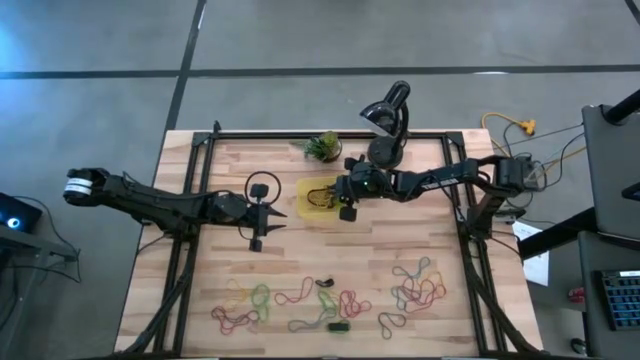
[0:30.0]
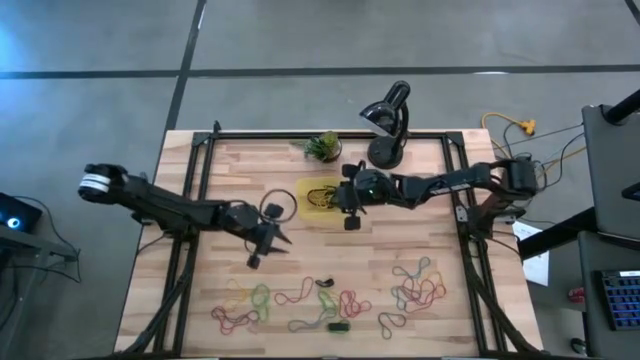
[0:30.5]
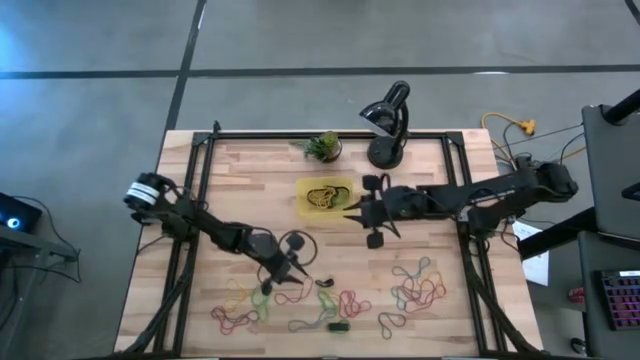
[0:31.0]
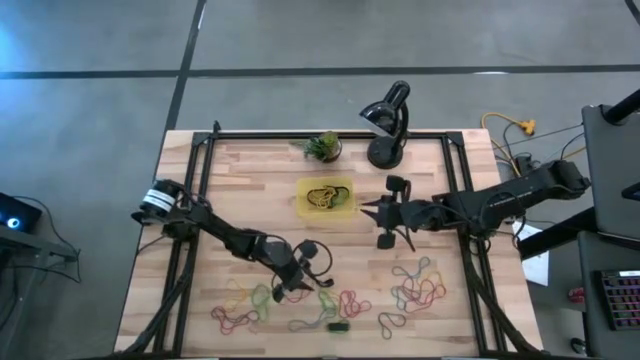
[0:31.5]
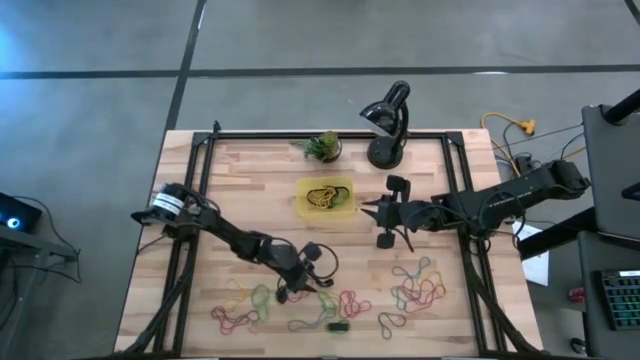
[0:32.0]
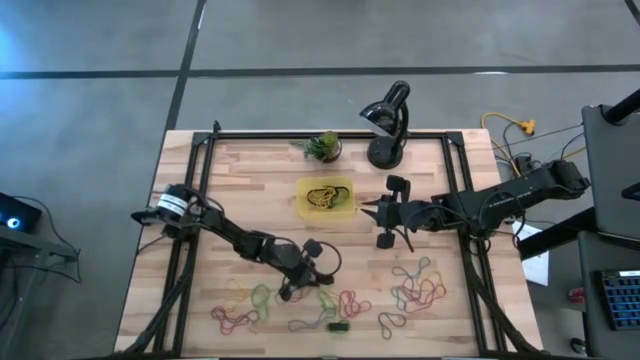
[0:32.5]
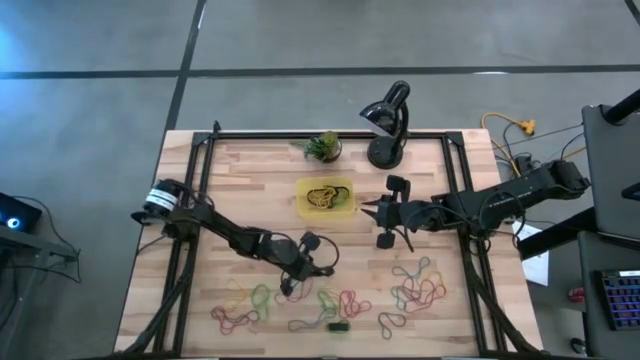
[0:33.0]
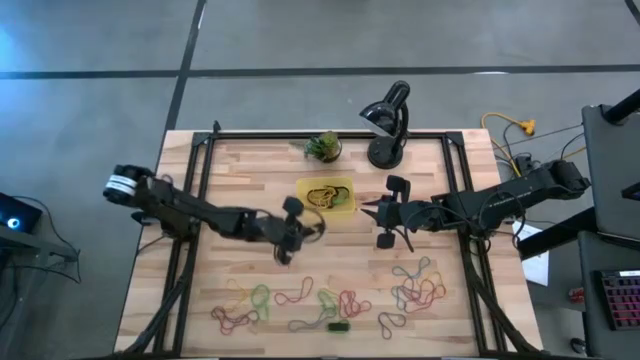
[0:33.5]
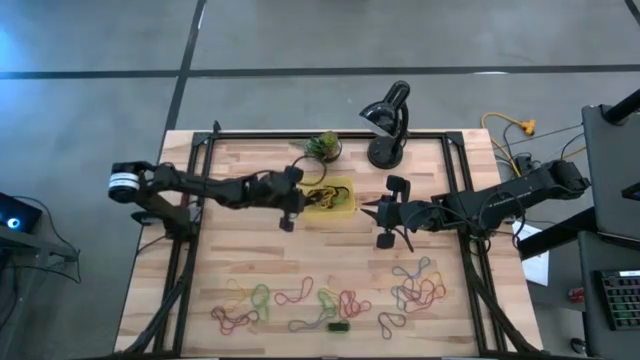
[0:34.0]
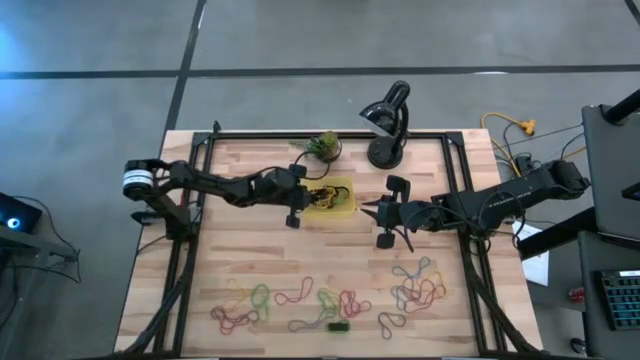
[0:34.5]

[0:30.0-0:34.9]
Task: Pick and place rubber bands into bin
Put the black rubber band in the yellow bin

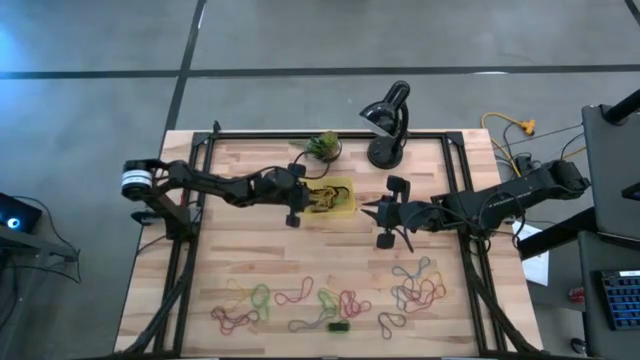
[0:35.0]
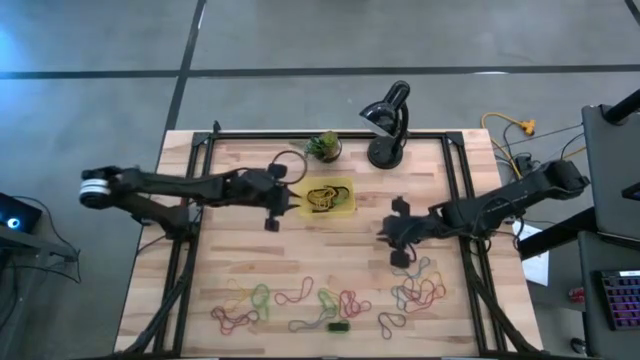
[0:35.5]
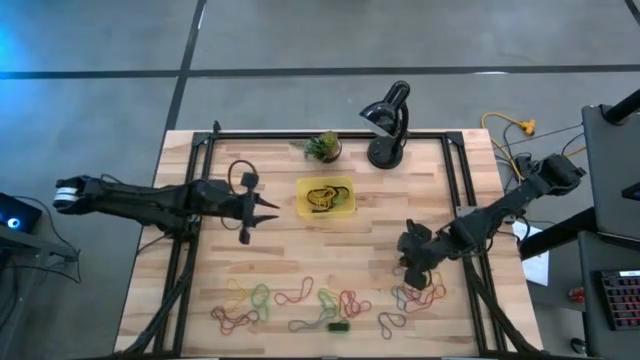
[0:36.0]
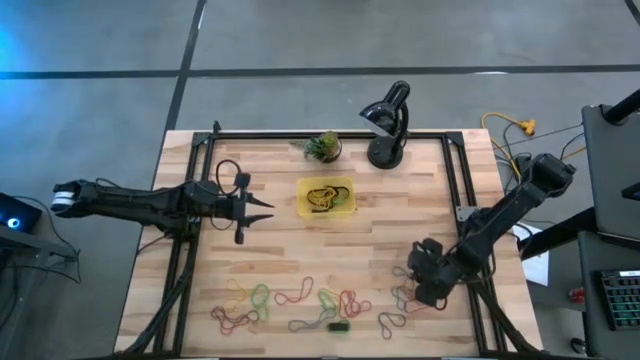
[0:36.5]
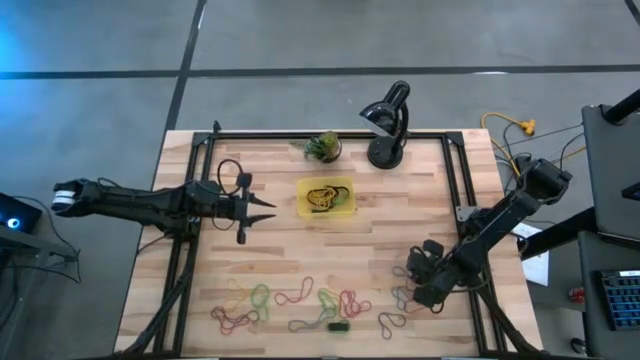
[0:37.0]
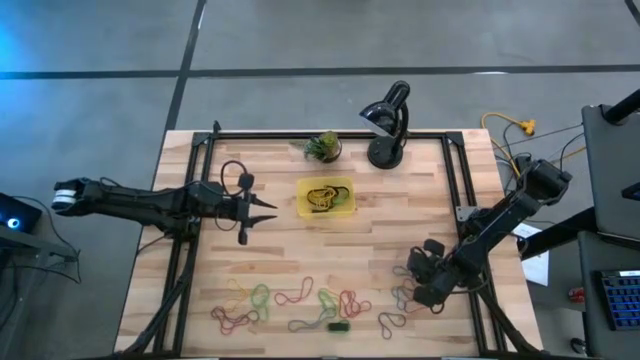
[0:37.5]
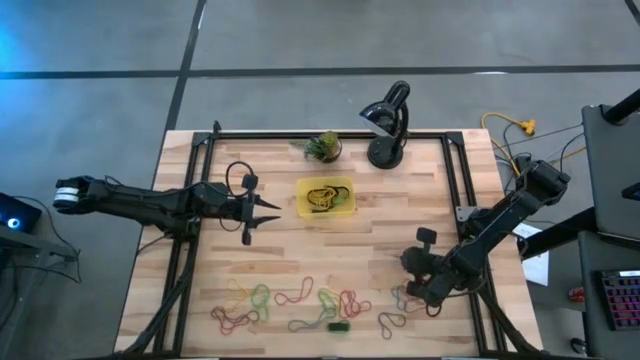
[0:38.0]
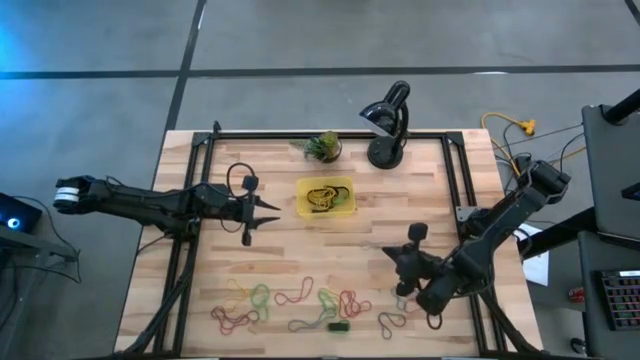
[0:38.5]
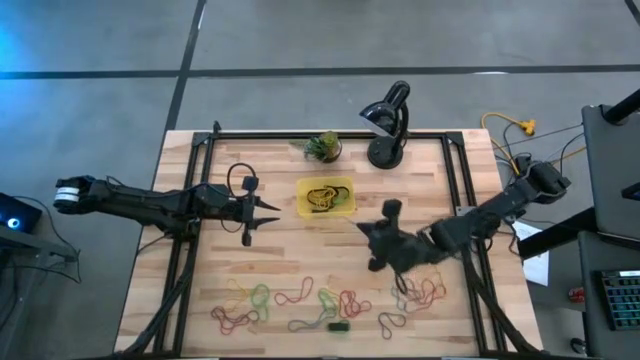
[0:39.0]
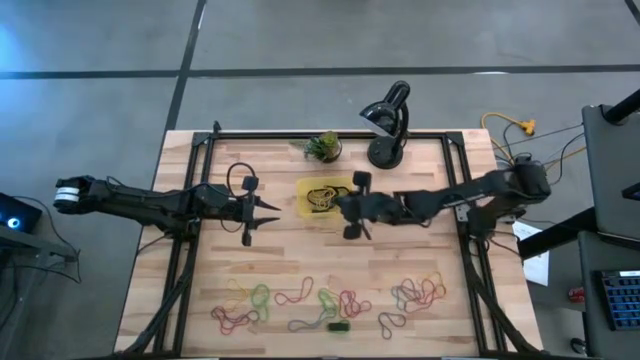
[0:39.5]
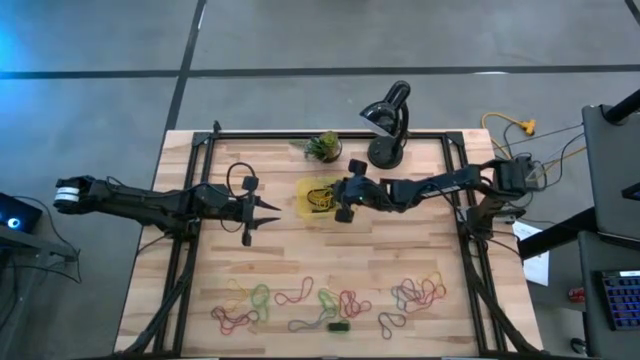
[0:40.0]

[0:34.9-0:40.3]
Put the blue rubber band in the yellow bin

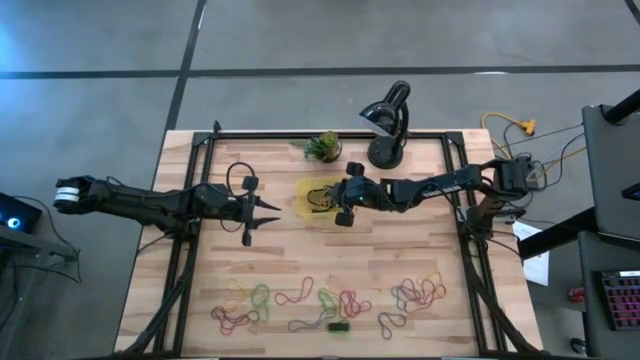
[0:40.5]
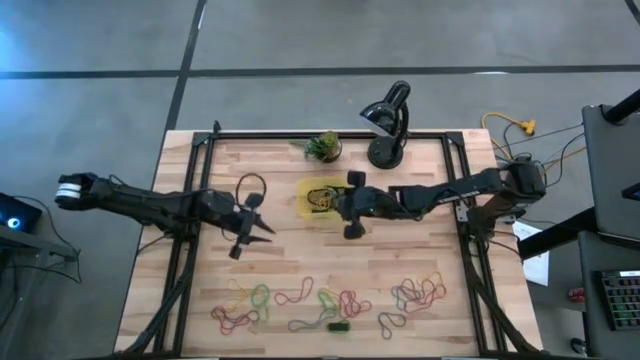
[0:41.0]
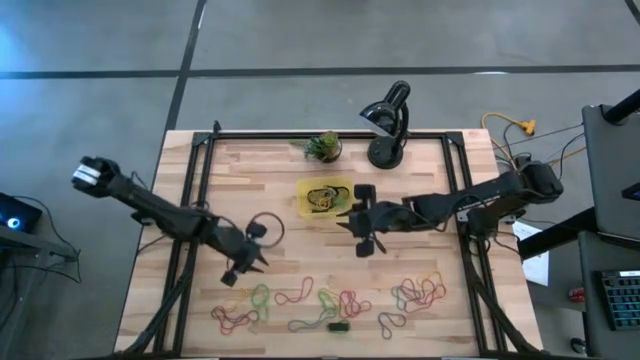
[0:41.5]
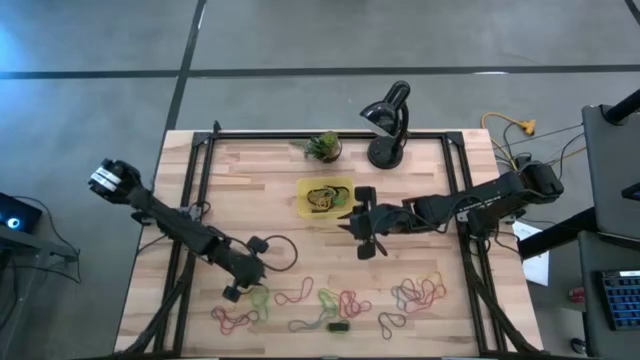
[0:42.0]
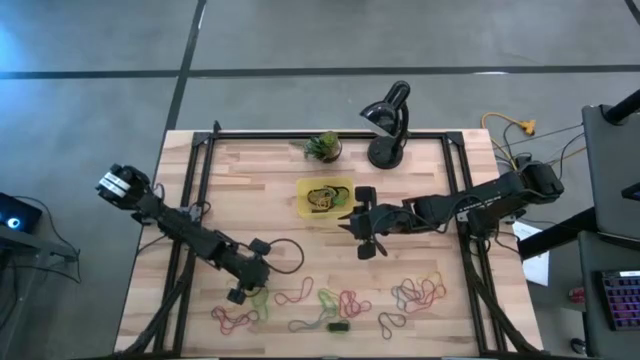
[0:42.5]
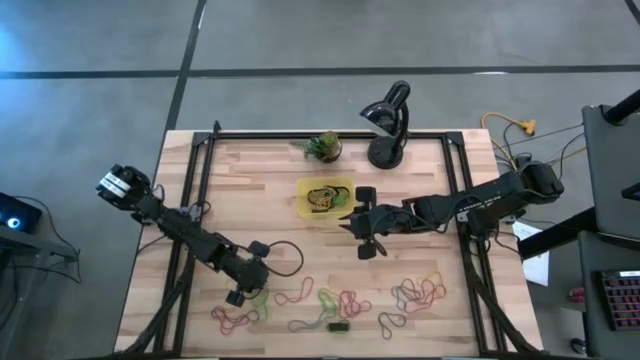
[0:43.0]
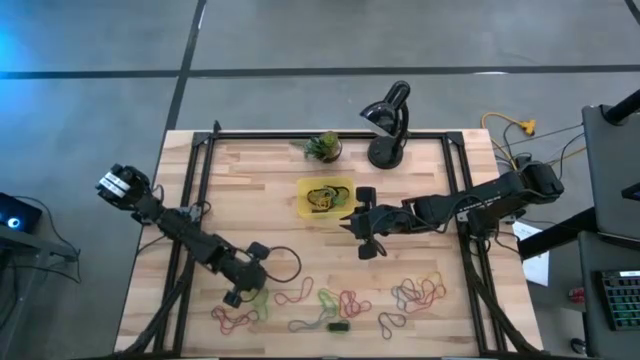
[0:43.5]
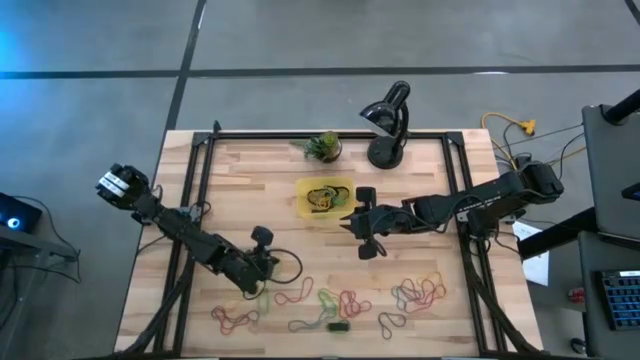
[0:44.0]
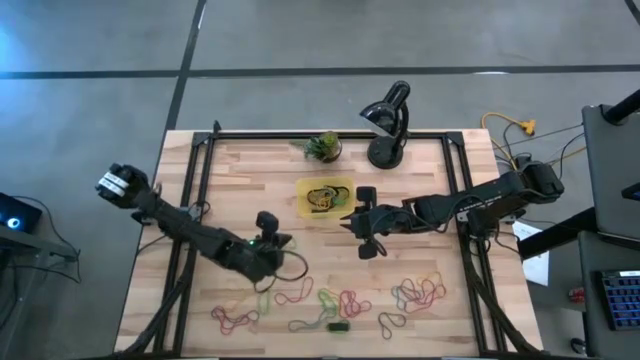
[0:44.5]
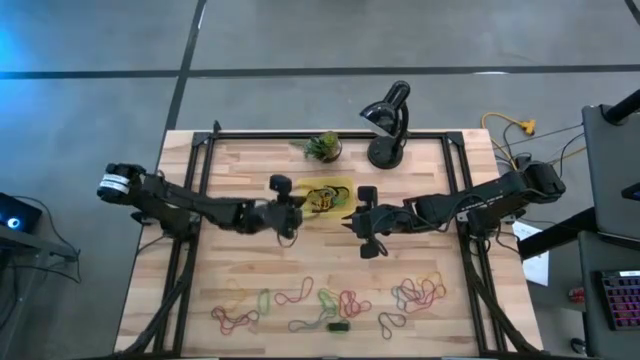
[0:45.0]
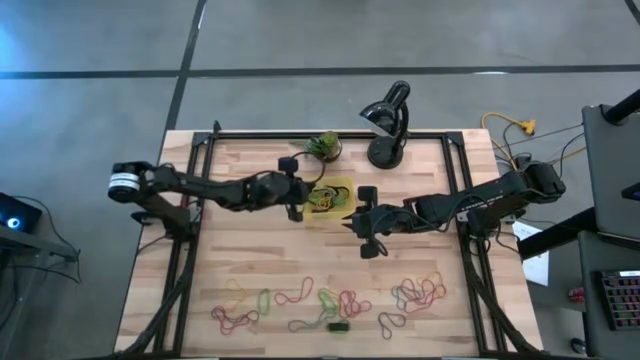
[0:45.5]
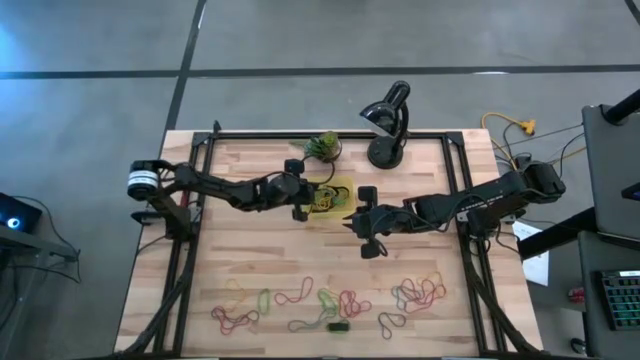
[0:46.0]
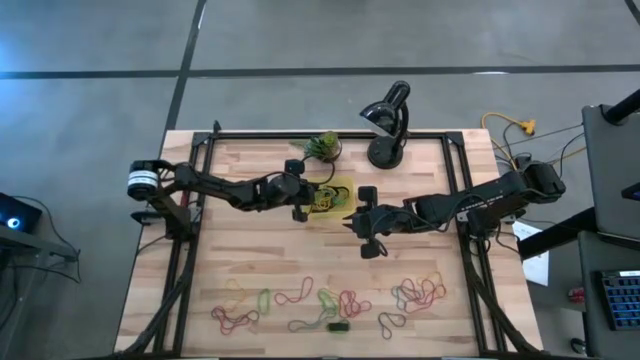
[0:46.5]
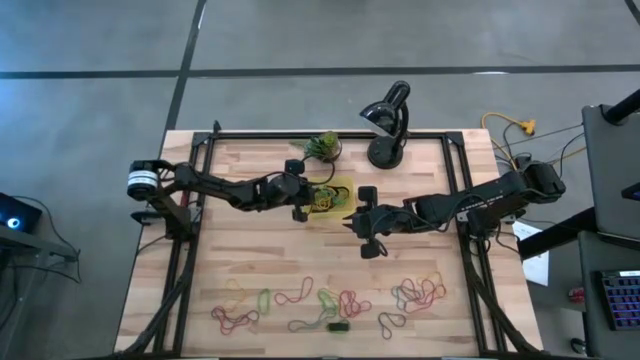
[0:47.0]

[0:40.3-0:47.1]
Put the green rubber band in the yellow bin

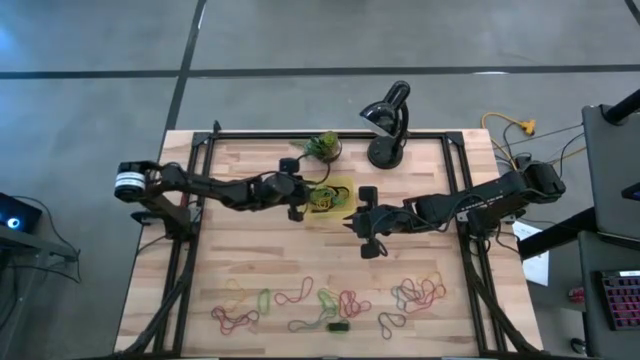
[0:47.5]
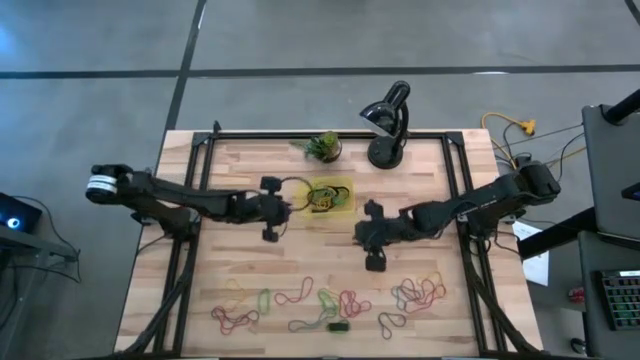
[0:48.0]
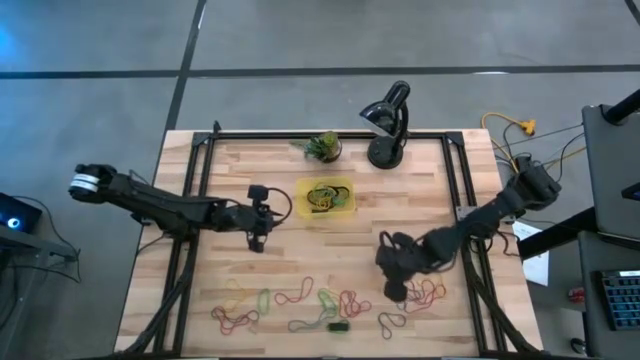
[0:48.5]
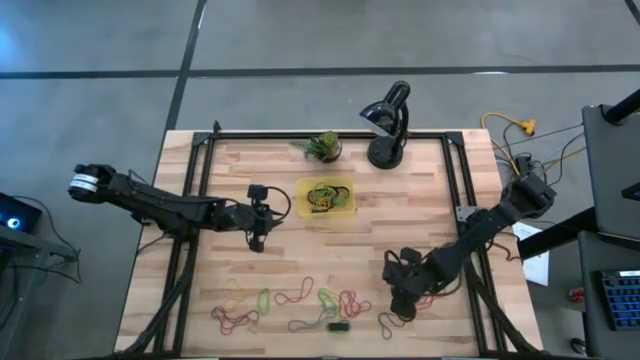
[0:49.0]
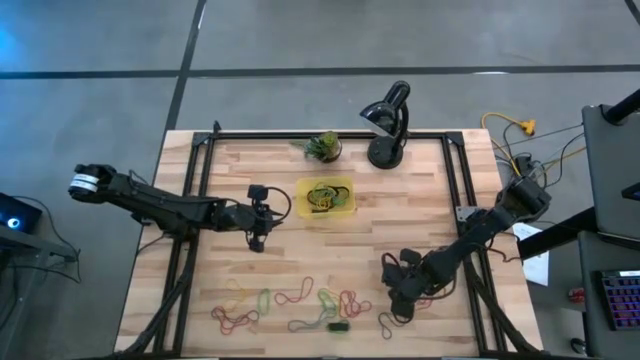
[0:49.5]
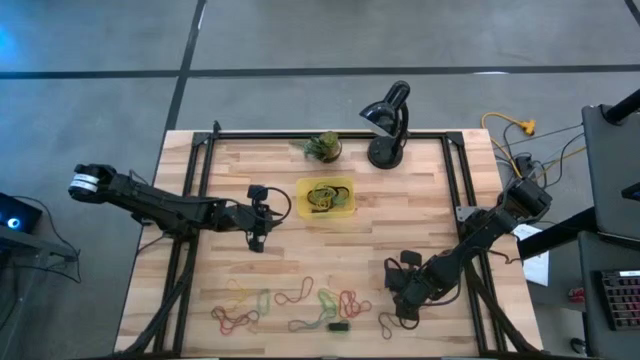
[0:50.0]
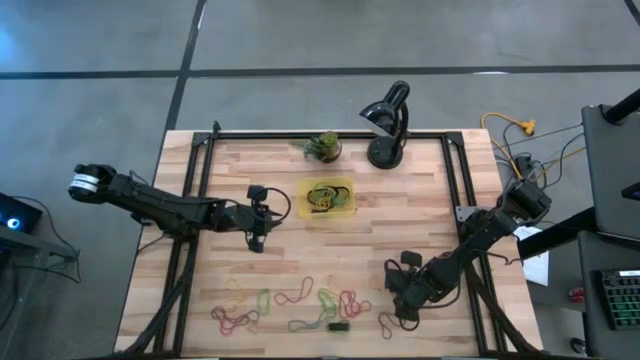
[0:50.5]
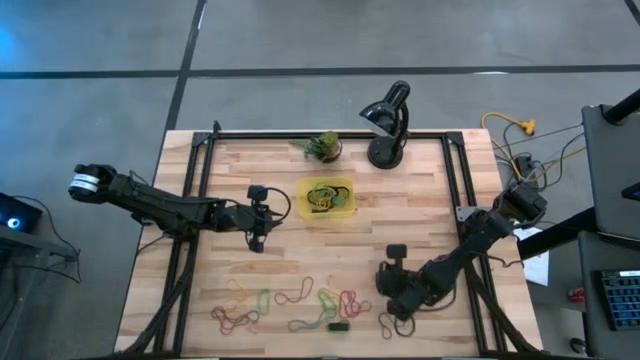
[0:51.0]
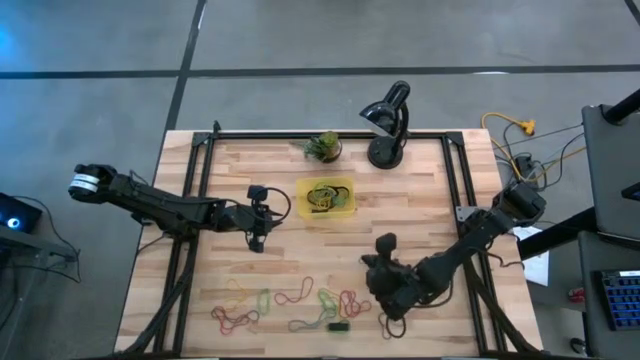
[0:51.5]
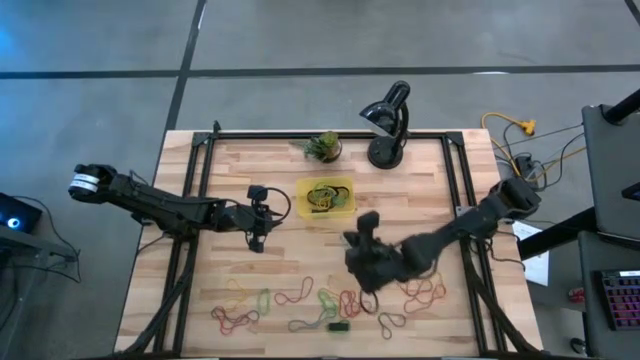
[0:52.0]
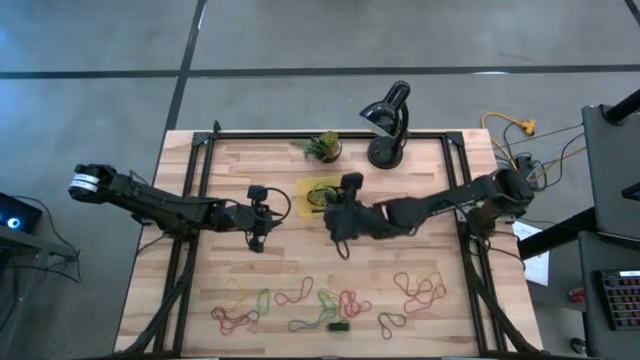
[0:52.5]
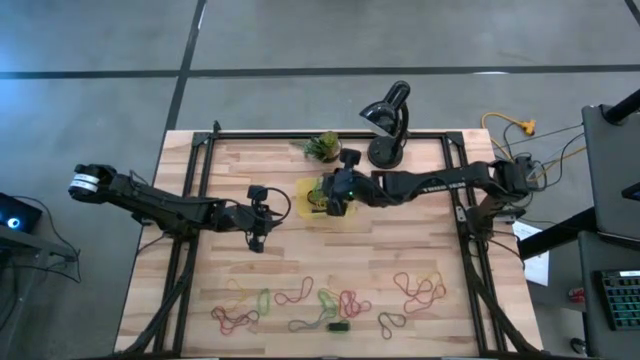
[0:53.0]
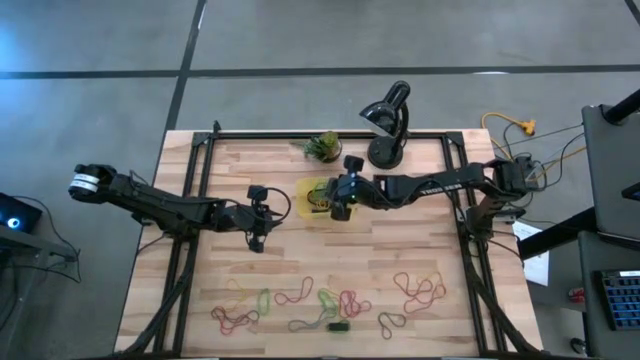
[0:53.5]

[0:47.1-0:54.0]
Put the blue rubber band in the yellow bin
